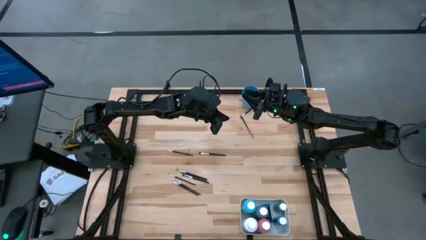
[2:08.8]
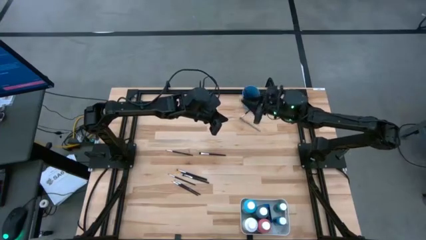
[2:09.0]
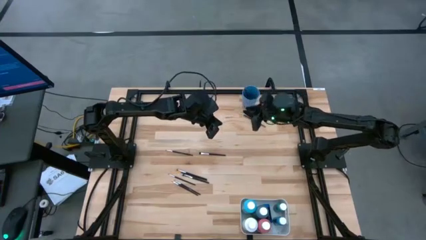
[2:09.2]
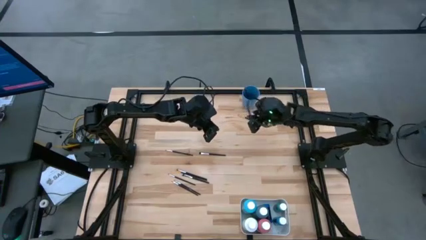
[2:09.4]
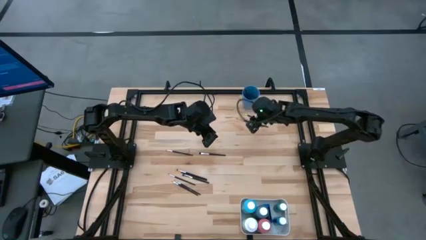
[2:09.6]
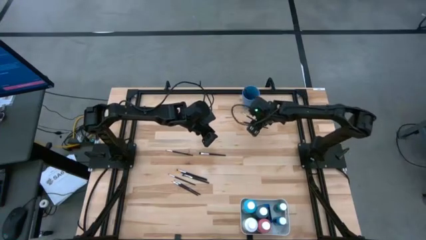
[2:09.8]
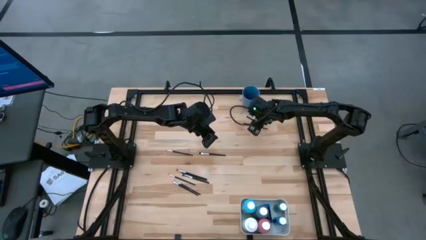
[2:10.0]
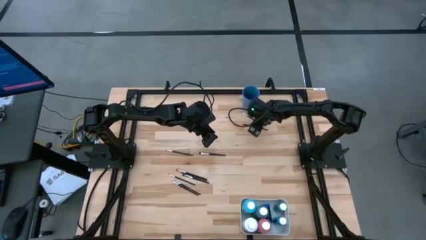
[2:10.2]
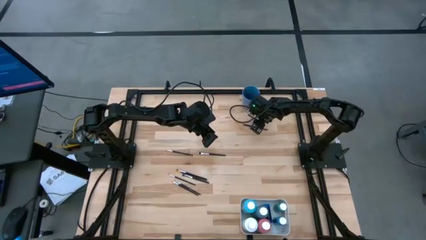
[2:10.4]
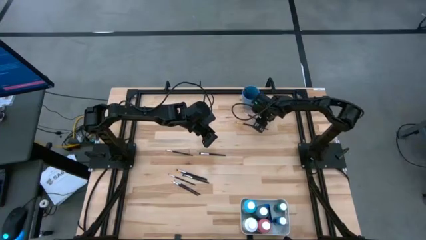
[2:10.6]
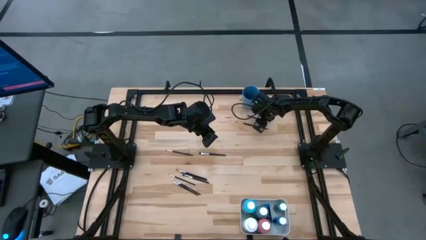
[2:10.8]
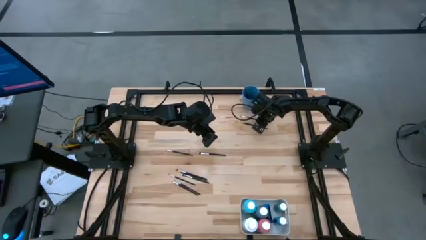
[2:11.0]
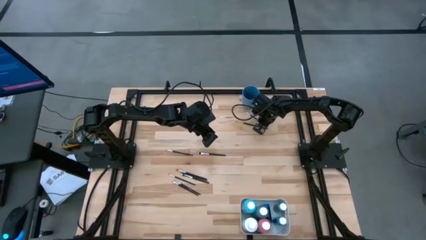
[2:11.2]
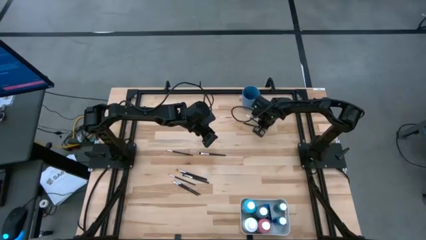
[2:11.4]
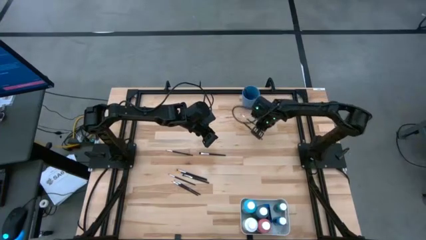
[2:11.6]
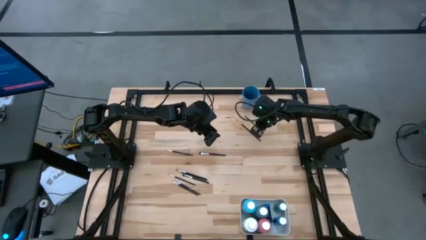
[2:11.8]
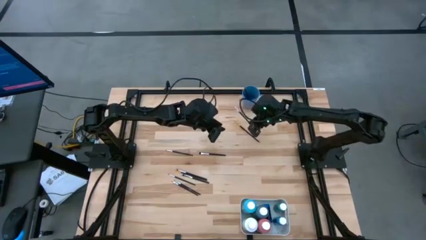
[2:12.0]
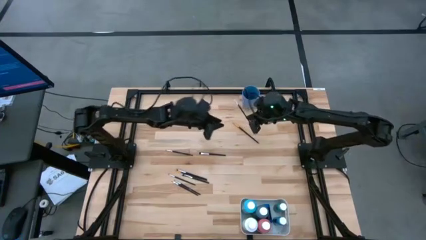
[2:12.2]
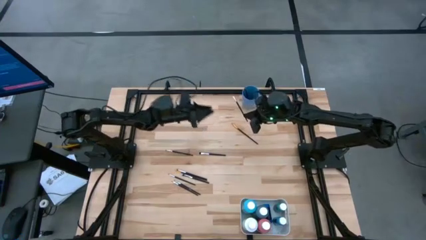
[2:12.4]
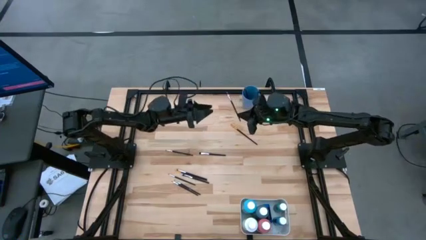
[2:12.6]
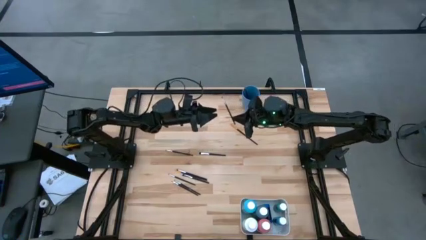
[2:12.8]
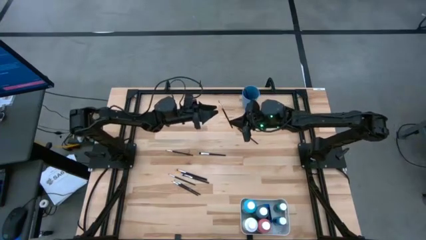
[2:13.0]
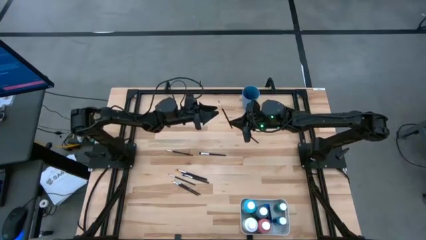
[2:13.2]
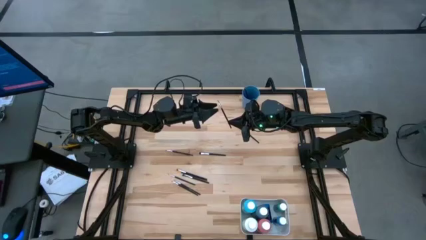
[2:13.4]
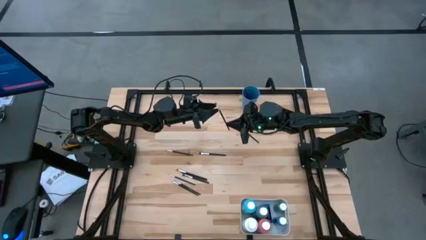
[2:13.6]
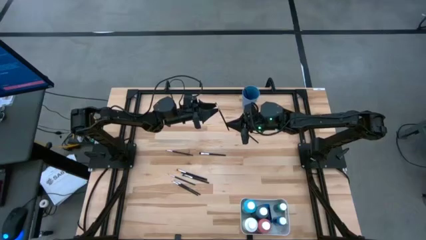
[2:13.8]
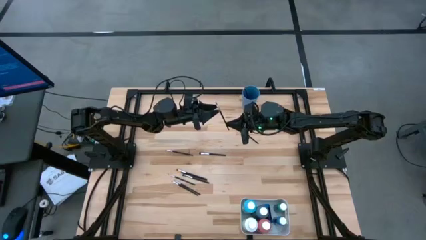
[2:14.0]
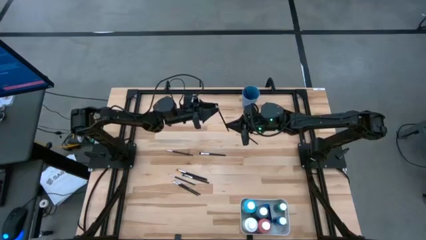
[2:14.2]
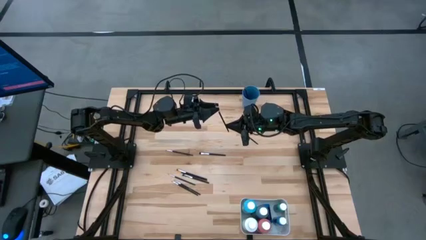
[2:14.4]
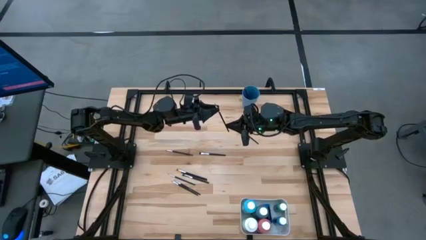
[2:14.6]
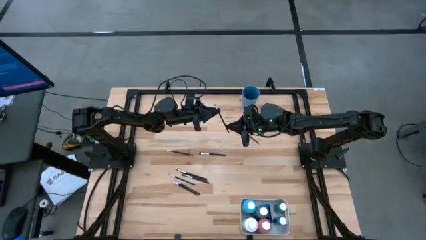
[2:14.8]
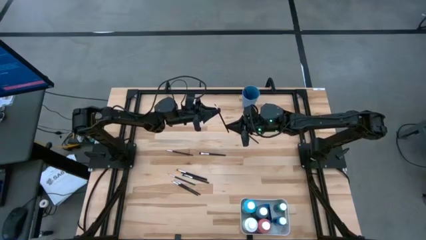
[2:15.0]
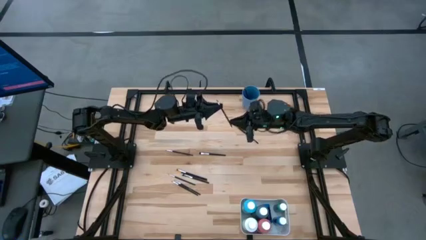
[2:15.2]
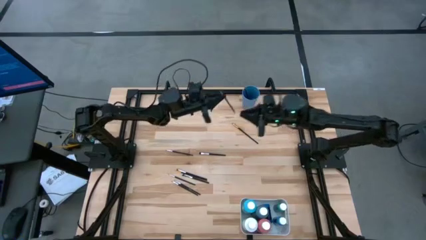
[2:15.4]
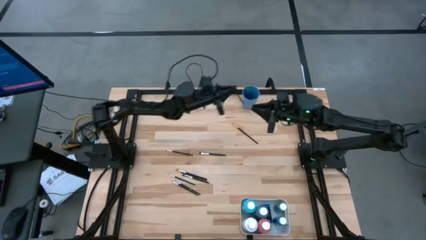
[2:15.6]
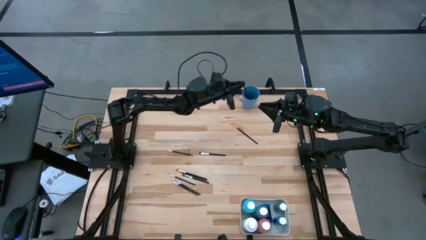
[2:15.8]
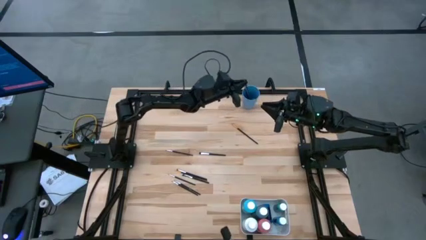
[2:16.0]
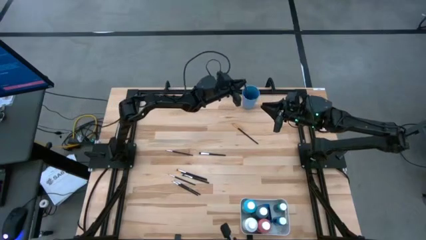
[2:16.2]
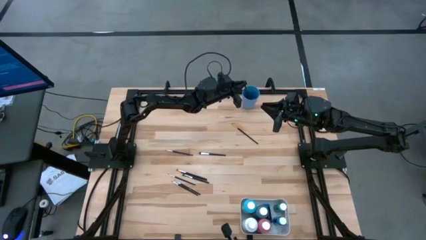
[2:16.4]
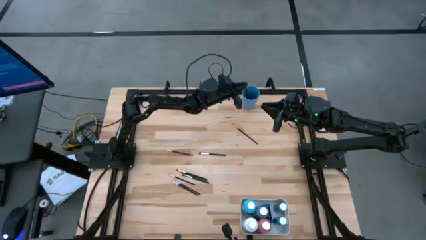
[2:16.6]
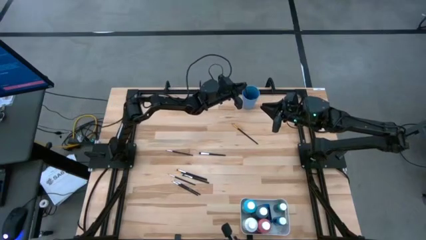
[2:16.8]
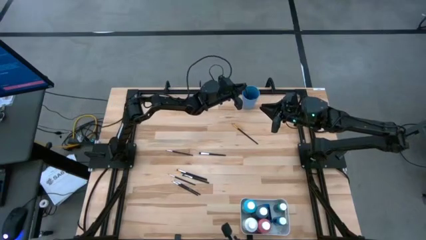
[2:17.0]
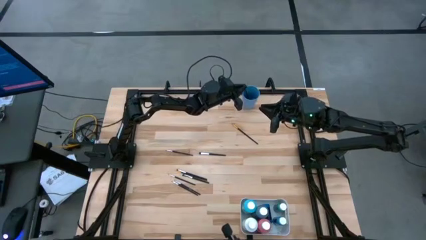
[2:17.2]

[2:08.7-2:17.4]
Task: Pick & Place Paint Supplies
Put the silver paintbrush into the blue cup

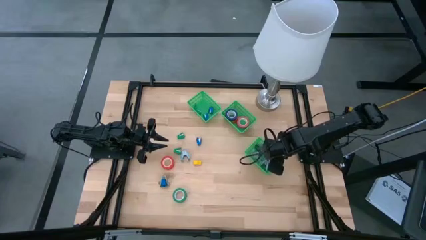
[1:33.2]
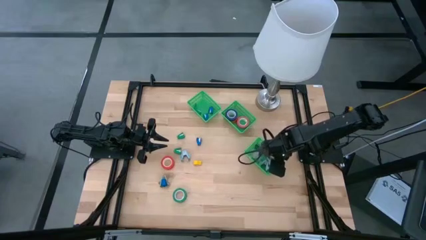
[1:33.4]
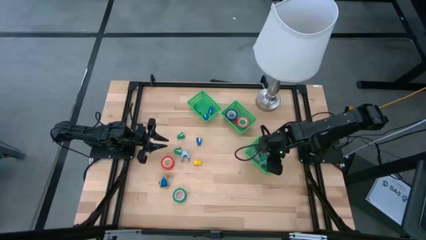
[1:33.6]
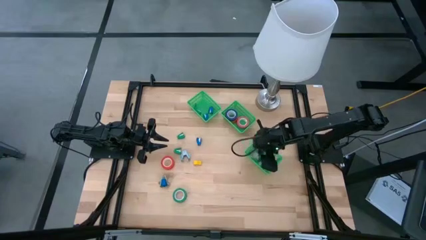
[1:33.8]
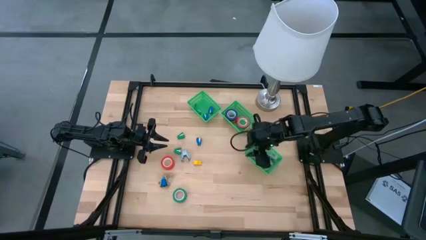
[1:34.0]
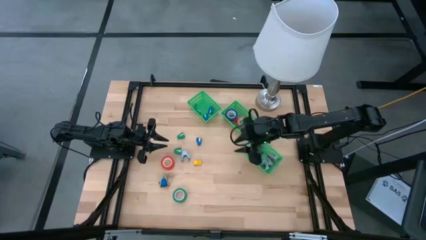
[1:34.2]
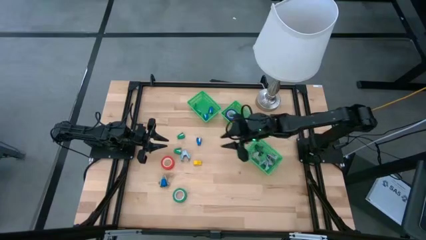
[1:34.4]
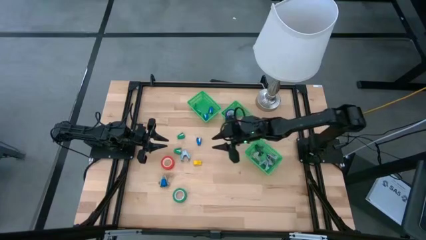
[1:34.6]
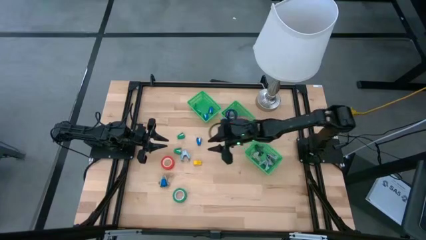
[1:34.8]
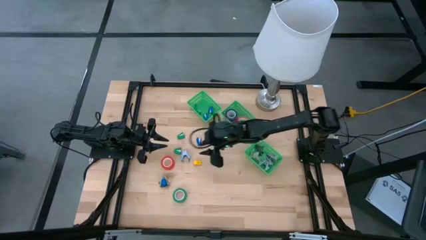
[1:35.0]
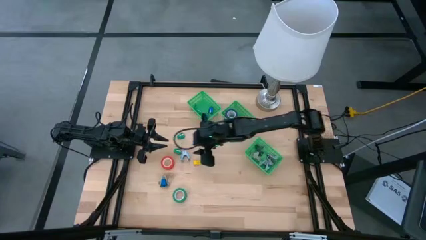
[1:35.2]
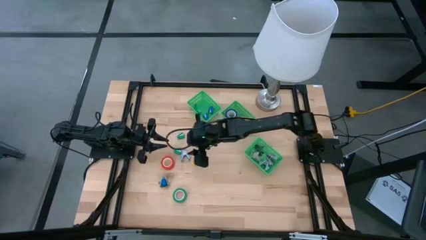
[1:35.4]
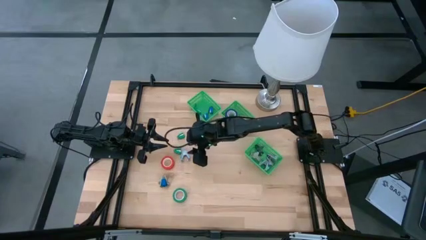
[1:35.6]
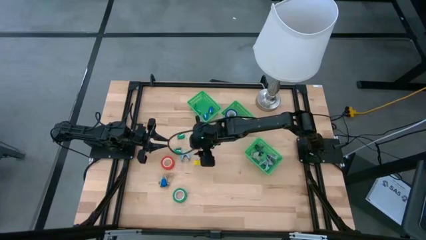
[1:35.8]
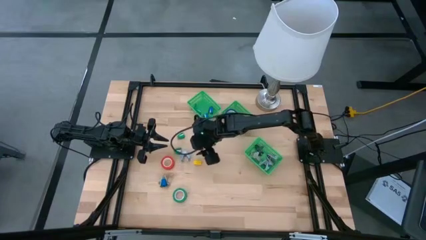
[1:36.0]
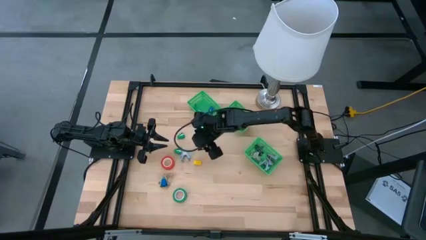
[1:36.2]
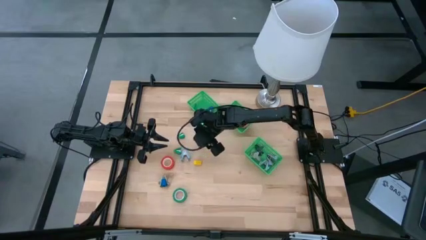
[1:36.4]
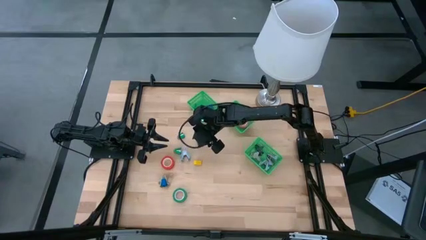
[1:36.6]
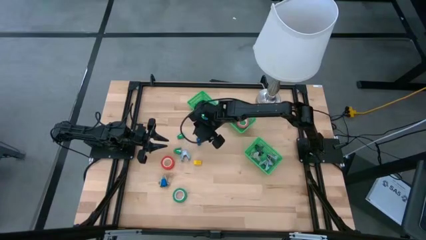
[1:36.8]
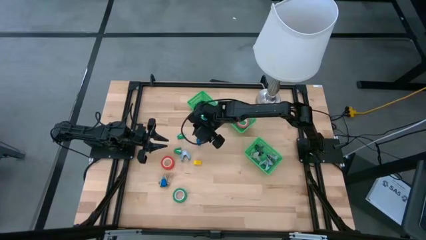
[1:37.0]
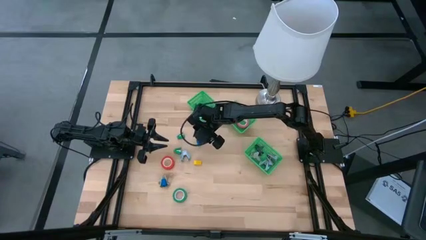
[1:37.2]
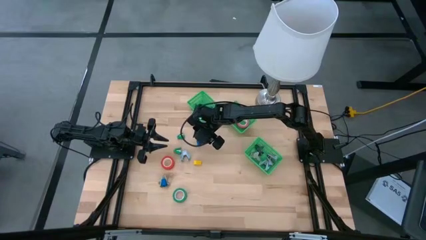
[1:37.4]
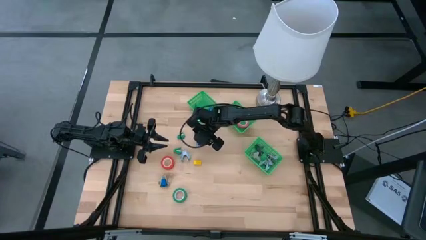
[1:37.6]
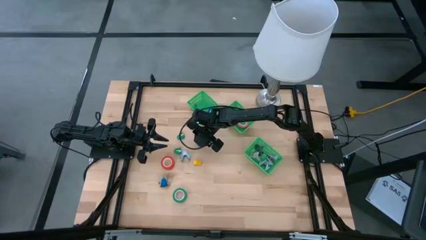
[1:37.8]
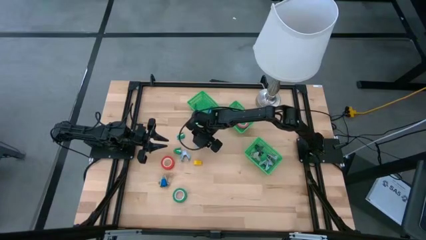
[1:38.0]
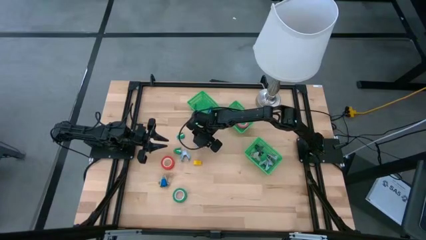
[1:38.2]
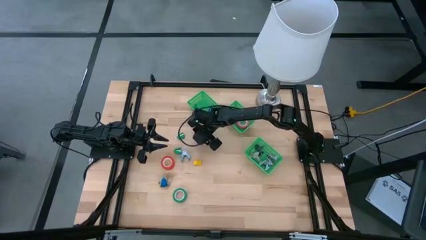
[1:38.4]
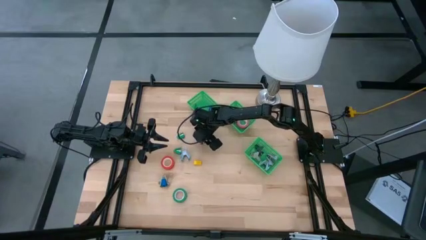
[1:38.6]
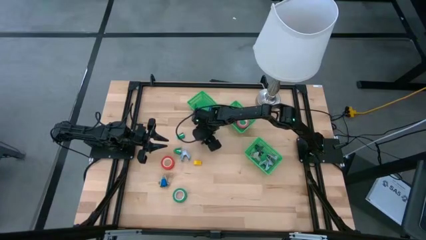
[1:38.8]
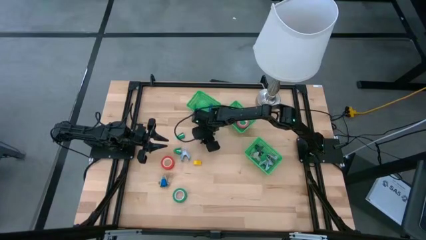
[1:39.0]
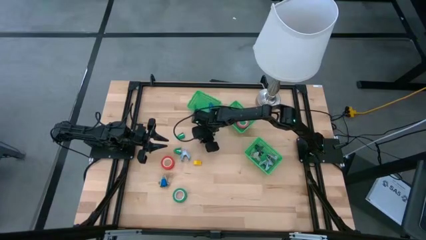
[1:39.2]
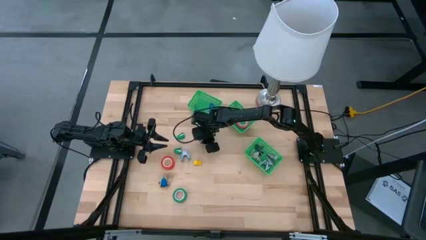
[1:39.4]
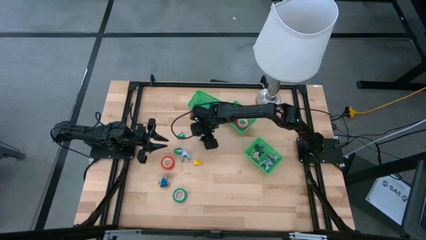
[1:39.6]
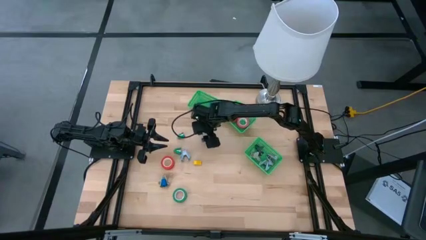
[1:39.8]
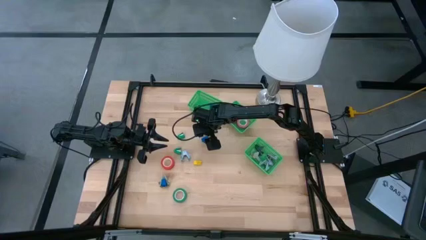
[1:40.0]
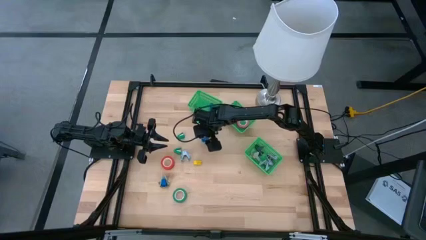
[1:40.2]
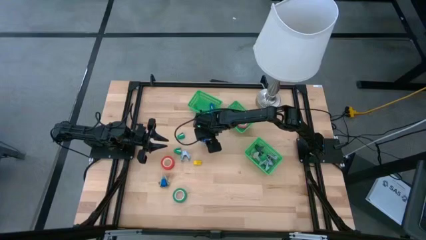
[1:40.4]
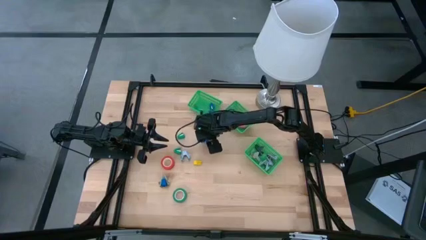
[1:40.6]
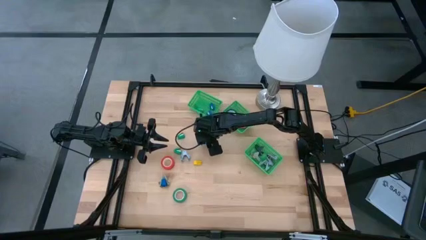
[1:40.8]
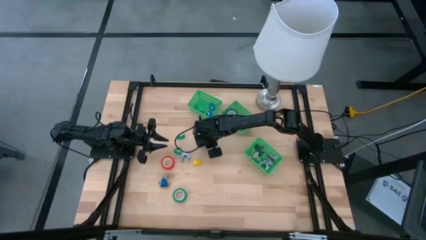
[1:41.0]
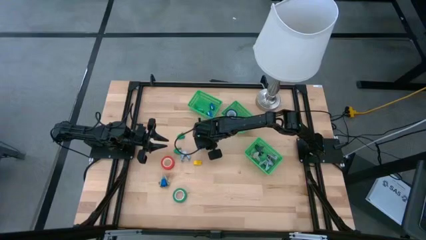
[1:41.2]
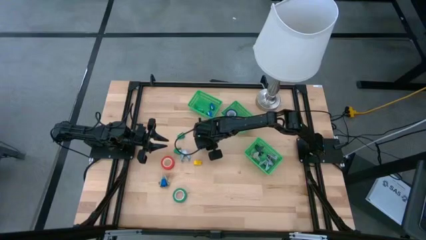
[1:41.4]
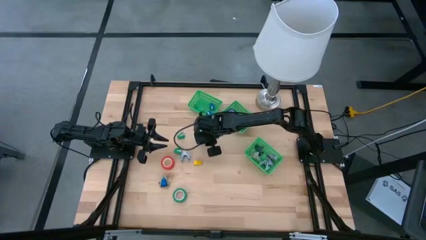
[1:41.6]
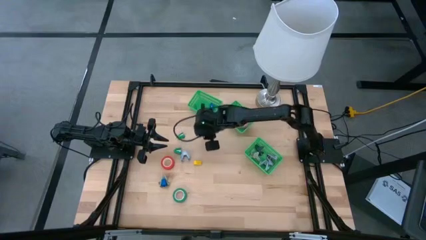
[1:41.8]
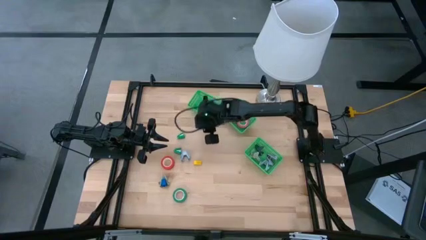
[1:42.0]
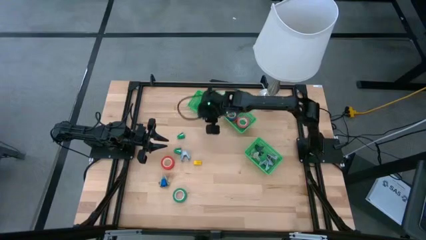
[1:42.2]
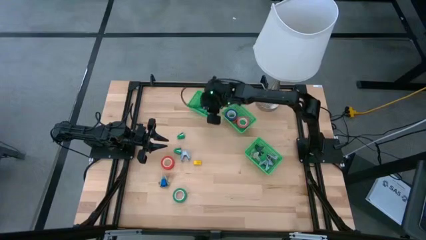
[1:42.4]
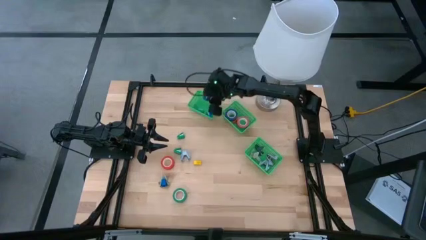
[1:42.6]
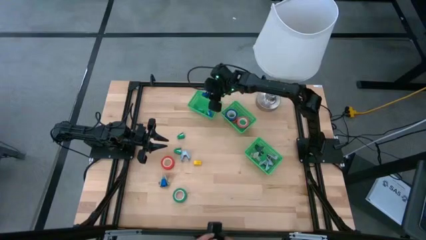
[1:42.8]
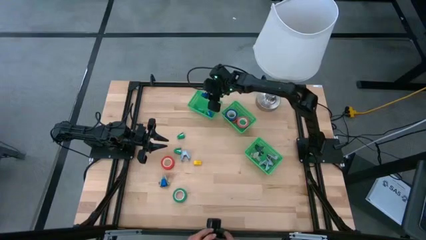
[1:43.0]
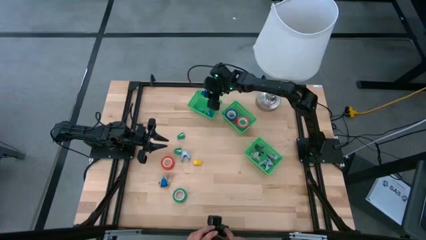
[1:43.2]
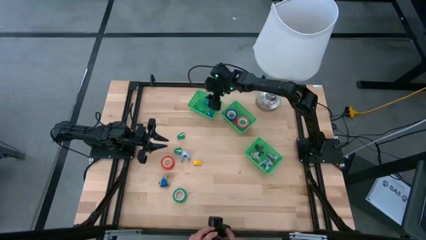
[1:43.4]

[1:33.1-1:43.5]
Task: Pick and place Stapler, Stapler remover, tape
Put the top blue stapler into the top basket
